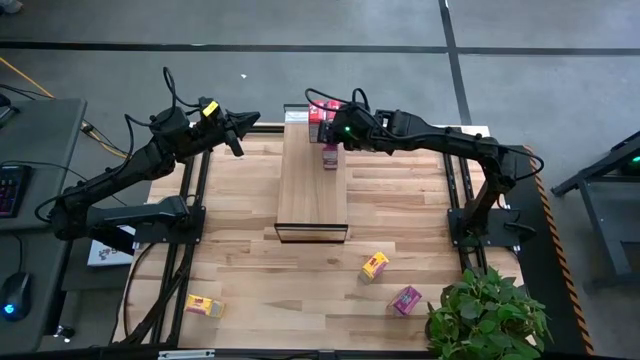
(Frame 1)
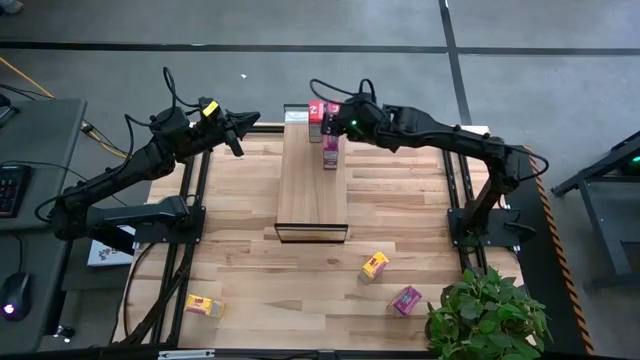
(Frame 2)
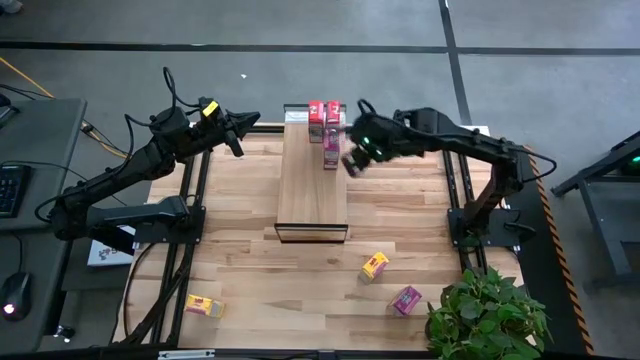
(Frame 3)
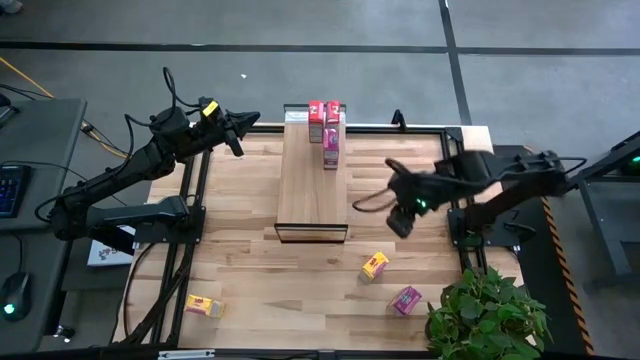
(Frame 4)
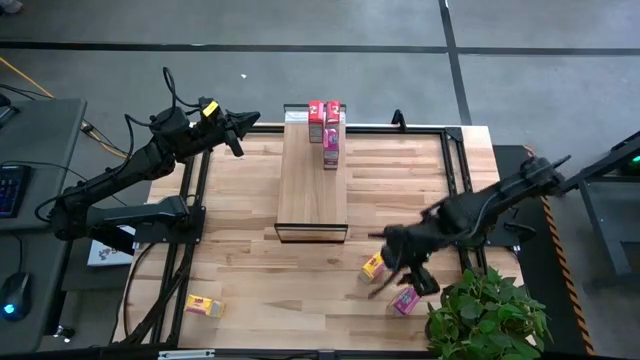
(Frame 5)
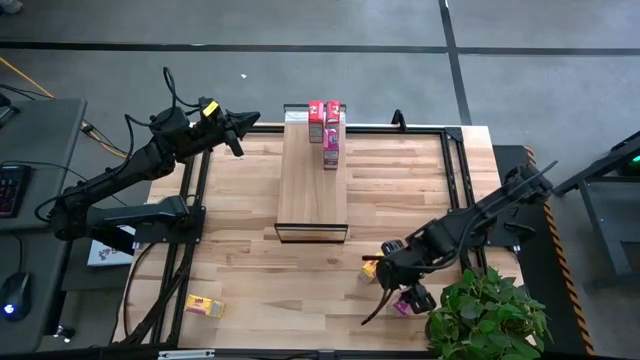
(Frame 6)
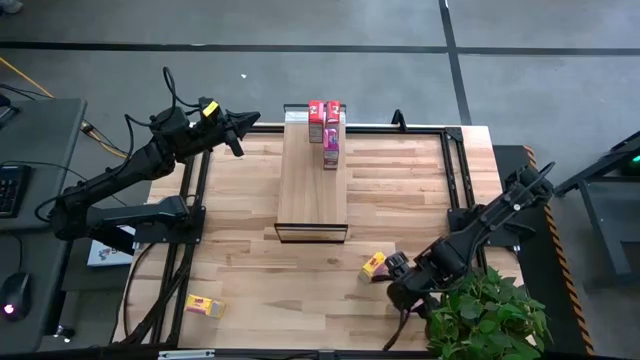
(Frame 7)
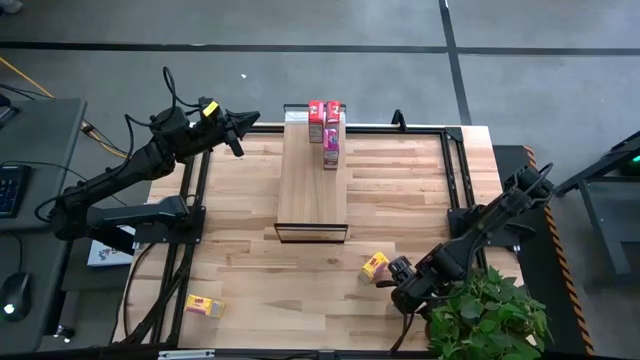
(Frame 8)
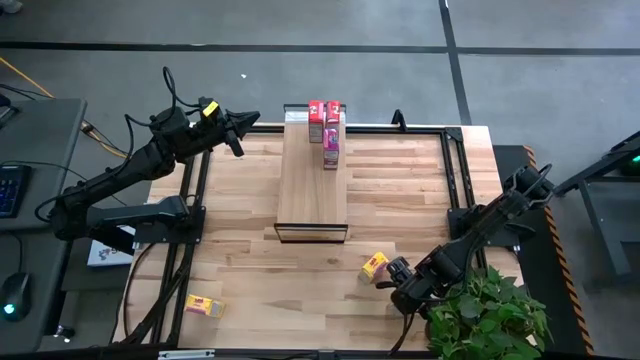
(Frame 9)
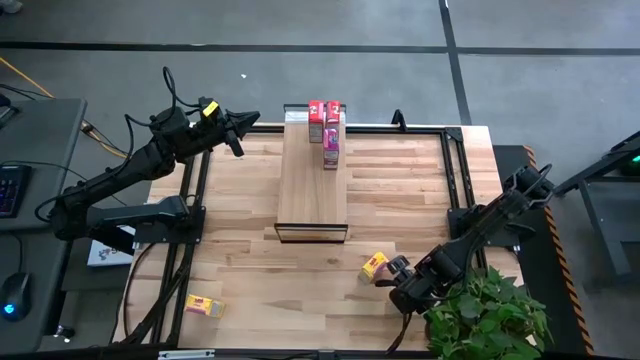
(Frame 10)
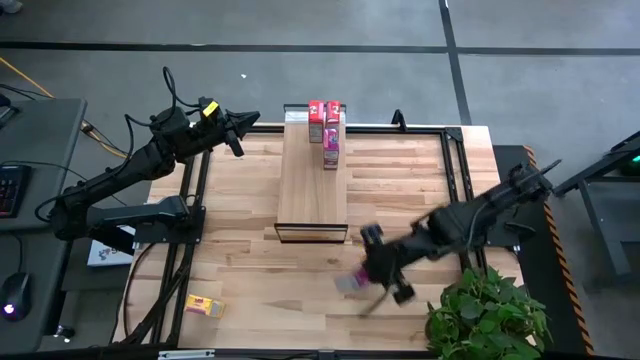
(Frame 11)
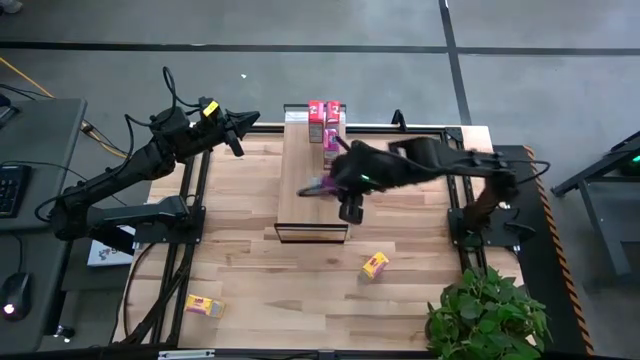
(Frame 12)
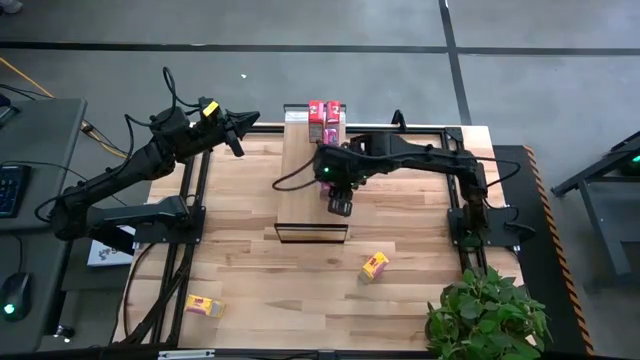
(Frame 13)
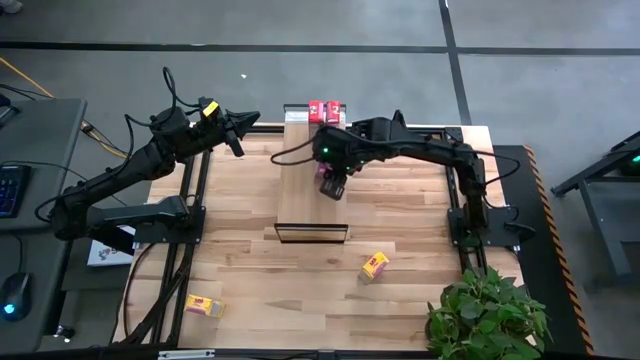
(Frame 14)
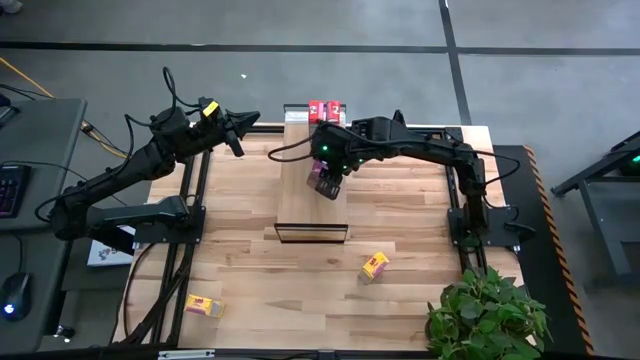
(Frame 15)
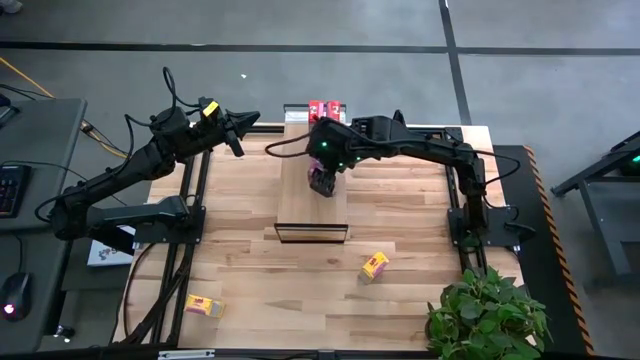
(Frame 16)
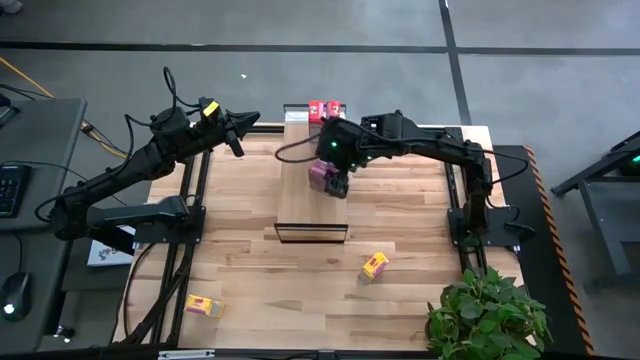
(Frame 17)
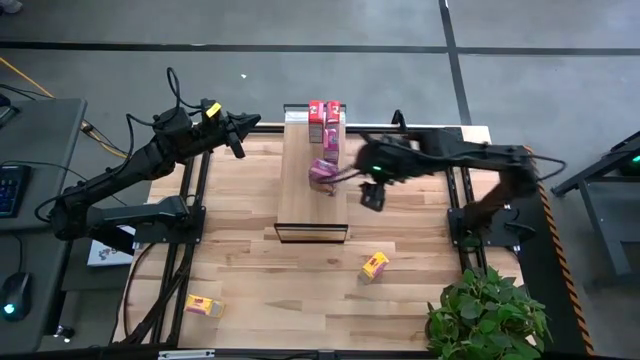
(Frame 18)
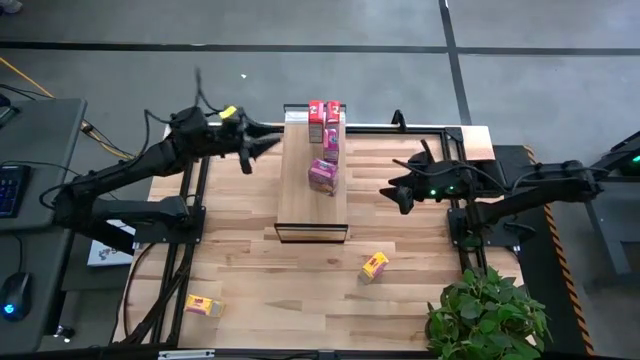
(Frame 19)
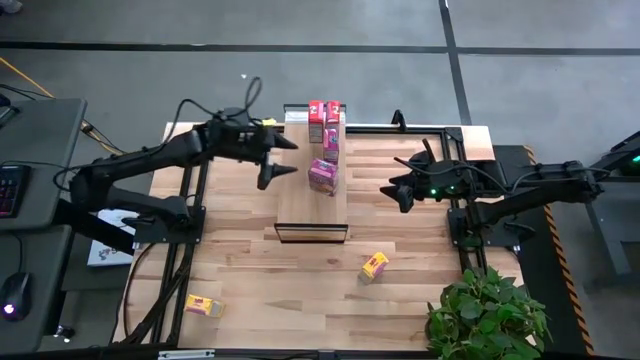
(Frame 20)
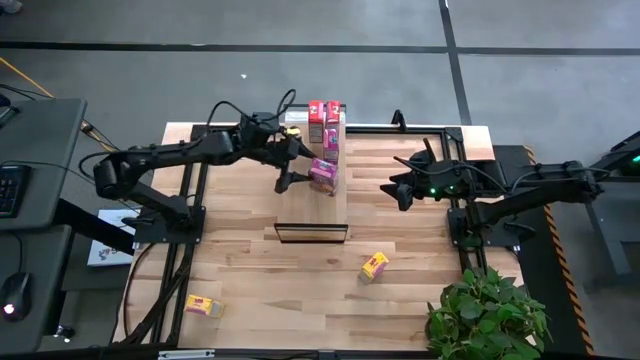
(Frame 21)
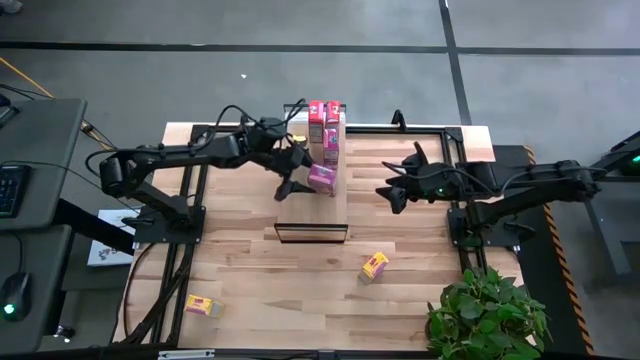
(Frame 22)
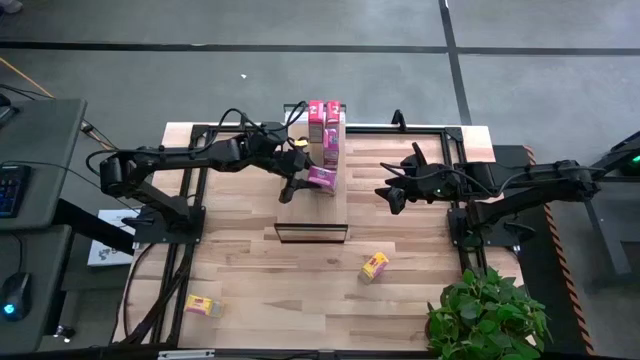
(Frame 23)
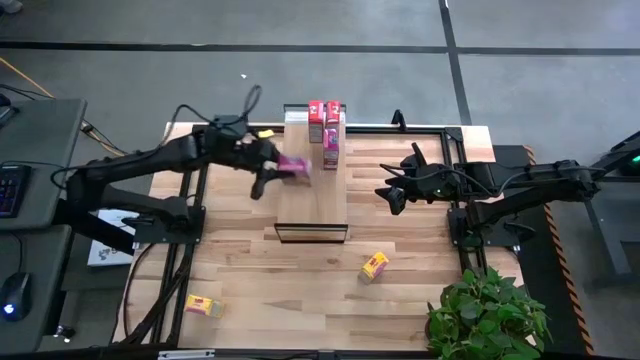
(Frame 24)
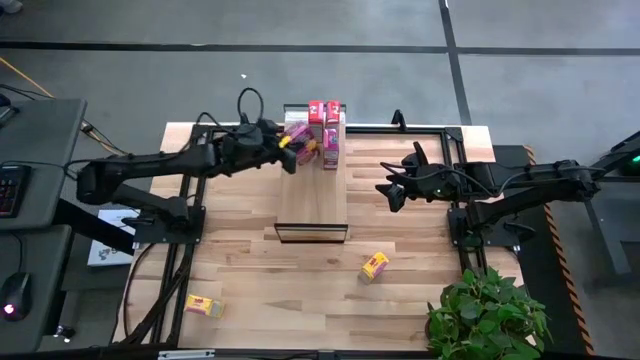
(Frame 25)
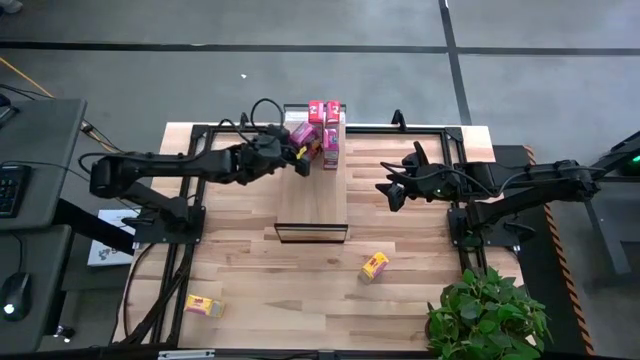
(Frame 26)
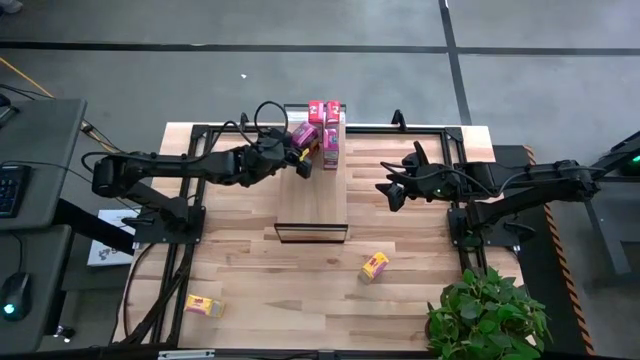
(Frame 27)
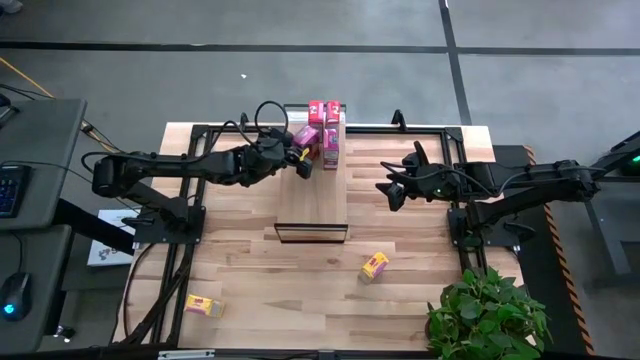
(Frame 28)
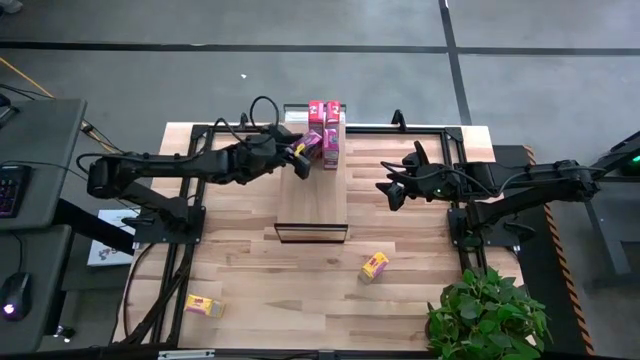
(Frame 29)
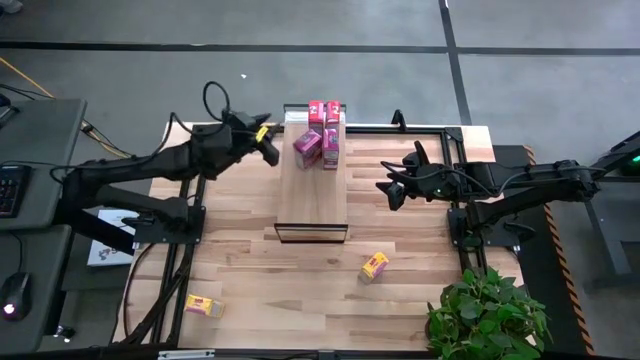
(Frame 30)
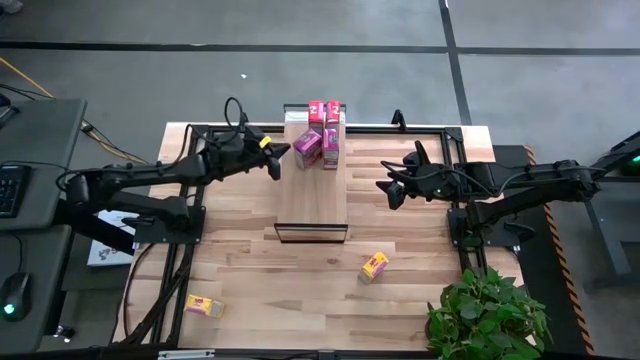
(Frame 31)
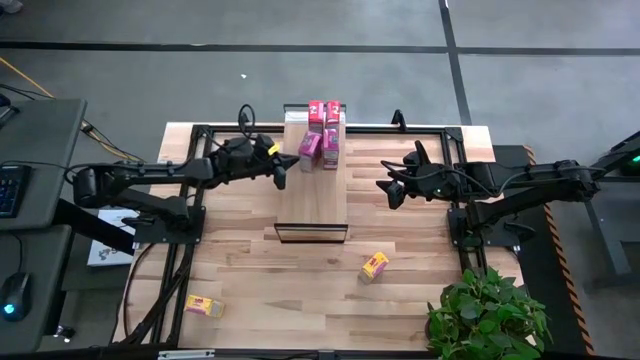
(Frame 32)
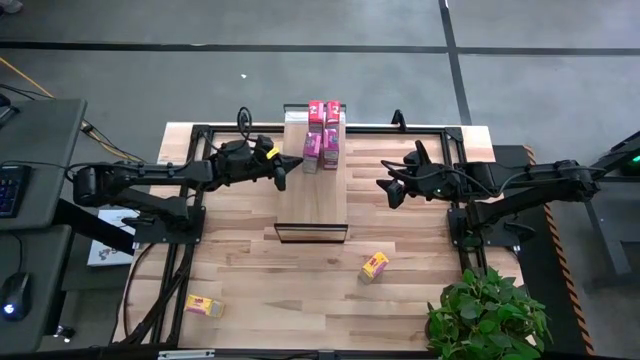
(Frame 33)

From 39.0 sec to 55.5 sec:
Task: Stack cereal on shelf
Put the purple cereal box on the shelf aligned with the other purple cereal box
